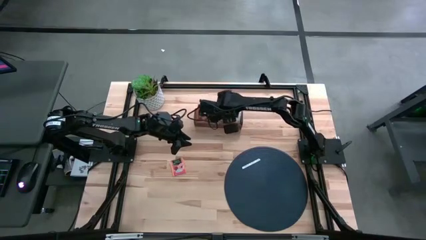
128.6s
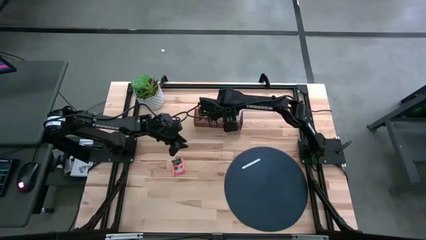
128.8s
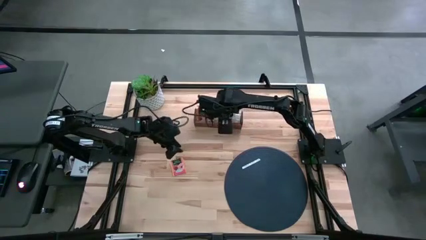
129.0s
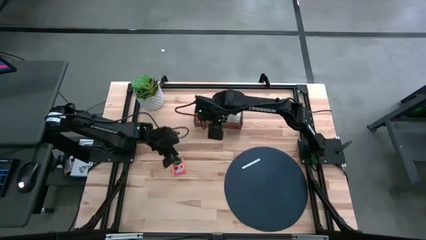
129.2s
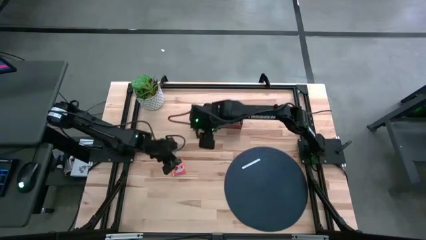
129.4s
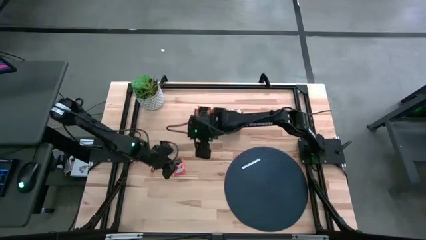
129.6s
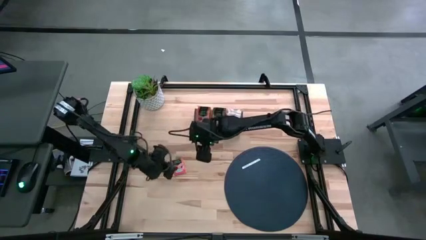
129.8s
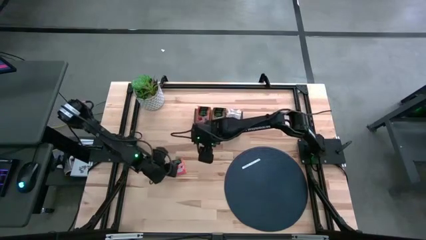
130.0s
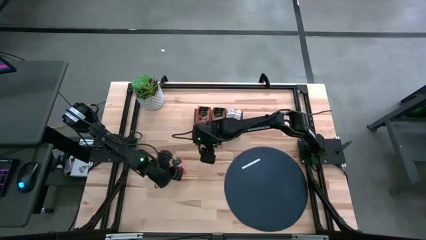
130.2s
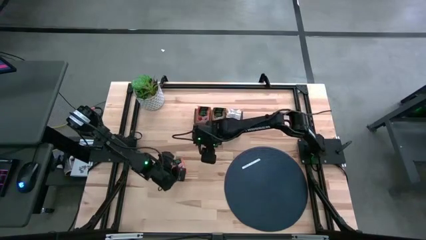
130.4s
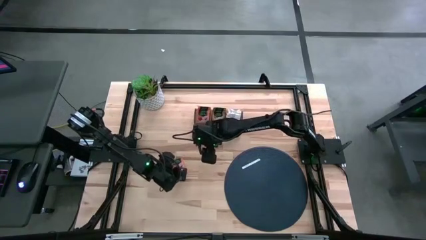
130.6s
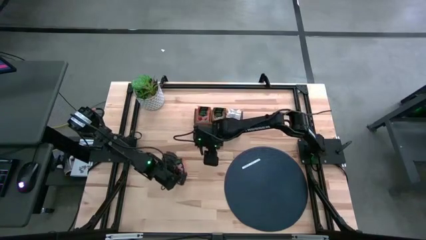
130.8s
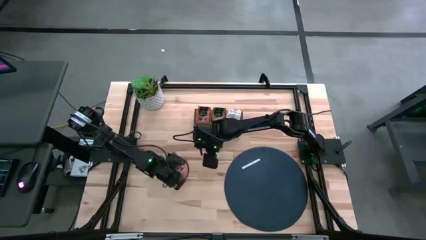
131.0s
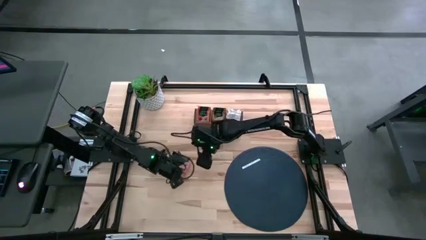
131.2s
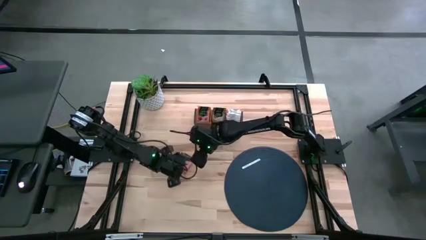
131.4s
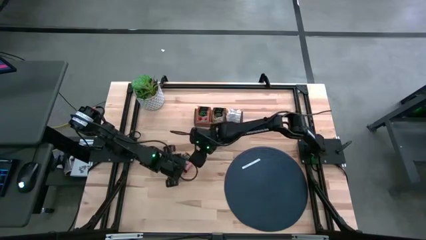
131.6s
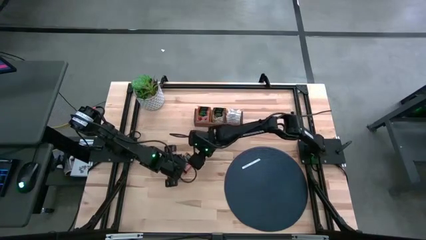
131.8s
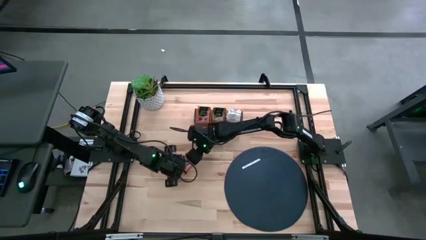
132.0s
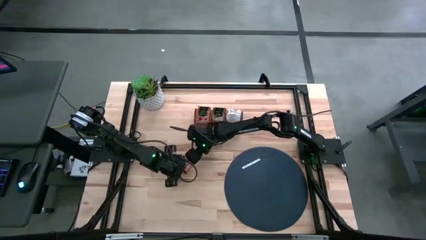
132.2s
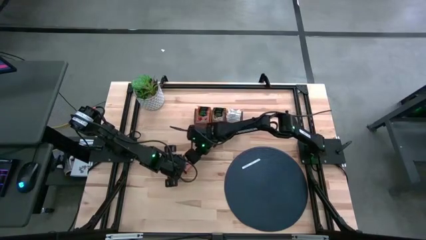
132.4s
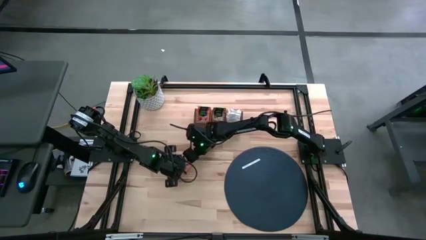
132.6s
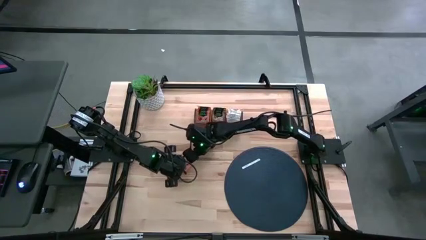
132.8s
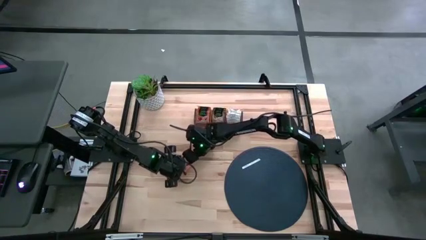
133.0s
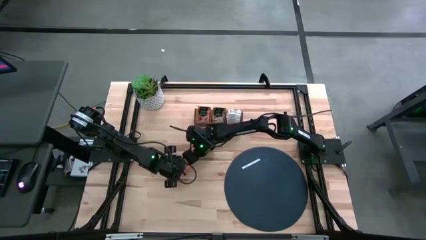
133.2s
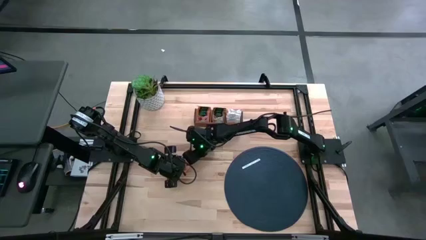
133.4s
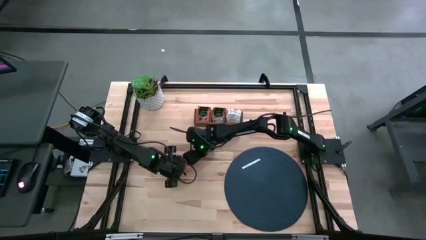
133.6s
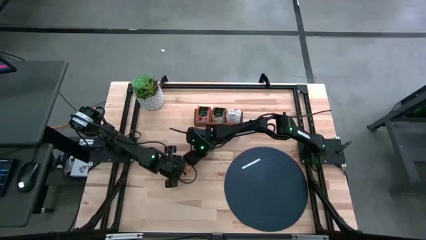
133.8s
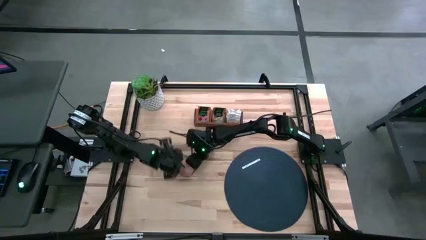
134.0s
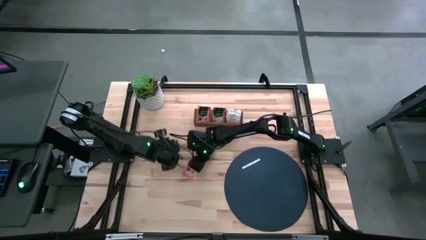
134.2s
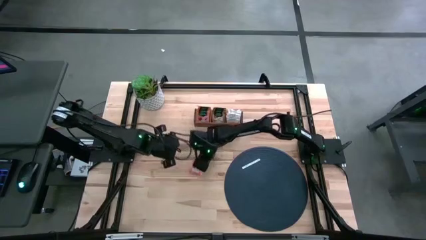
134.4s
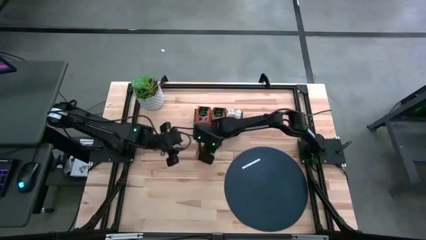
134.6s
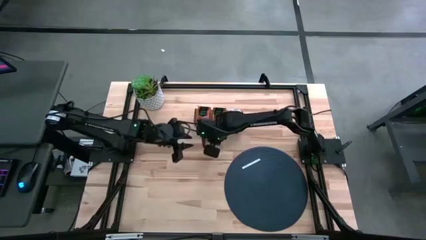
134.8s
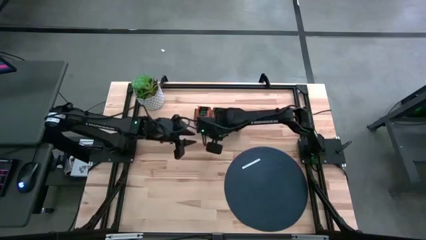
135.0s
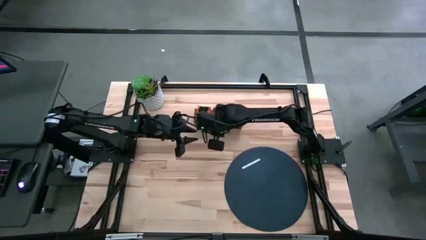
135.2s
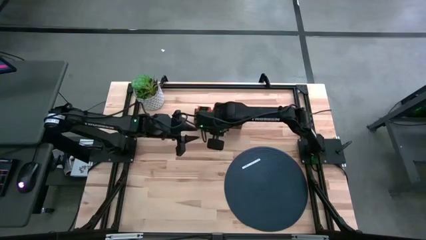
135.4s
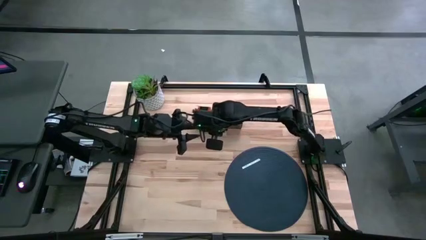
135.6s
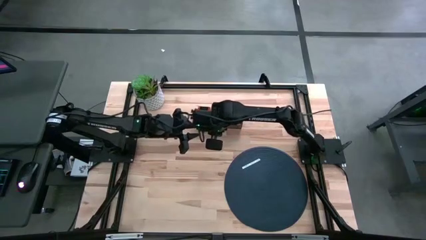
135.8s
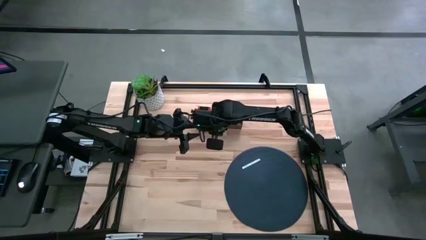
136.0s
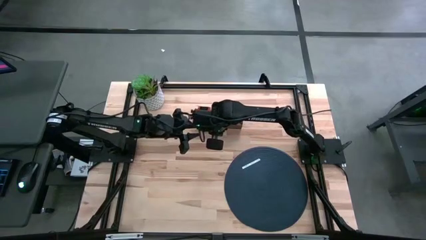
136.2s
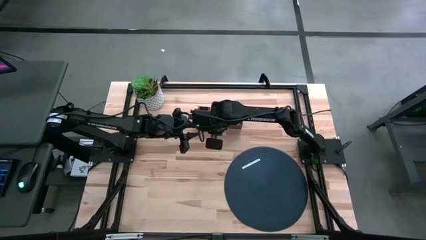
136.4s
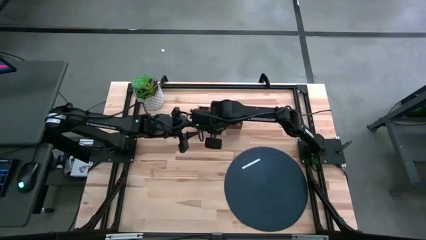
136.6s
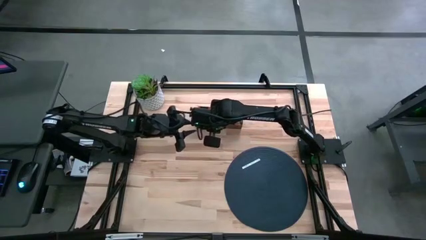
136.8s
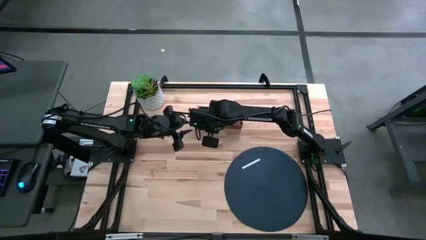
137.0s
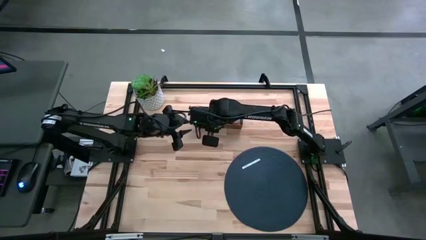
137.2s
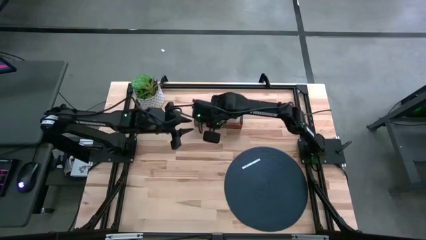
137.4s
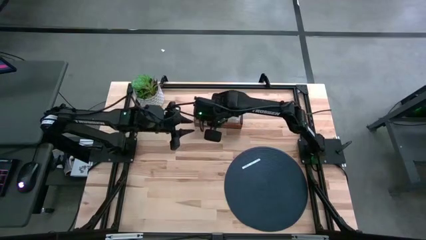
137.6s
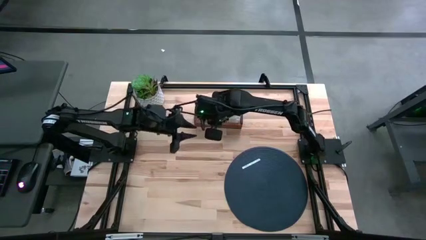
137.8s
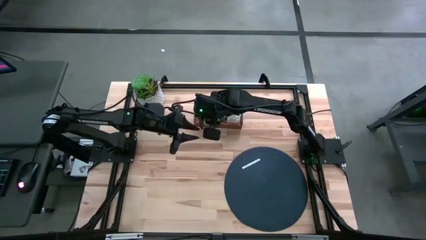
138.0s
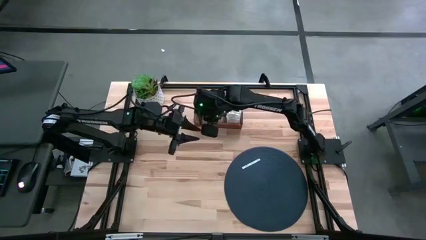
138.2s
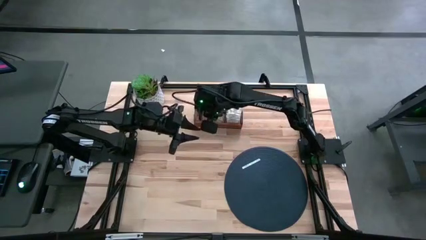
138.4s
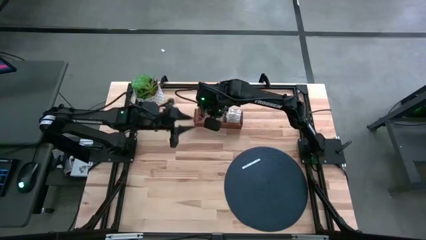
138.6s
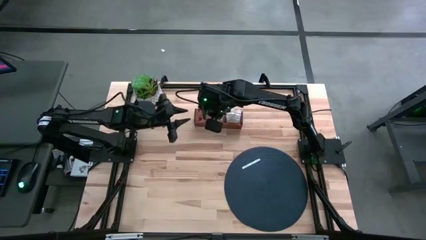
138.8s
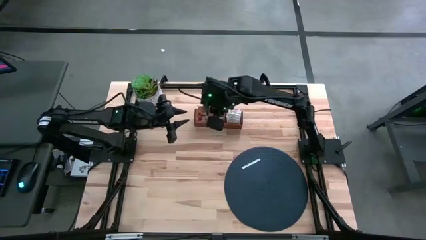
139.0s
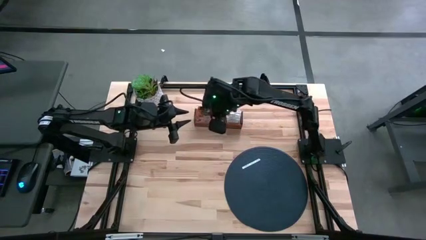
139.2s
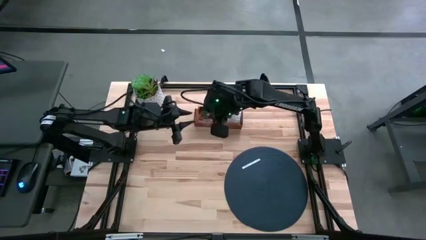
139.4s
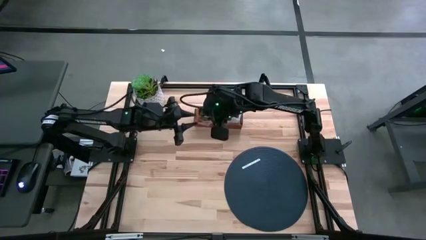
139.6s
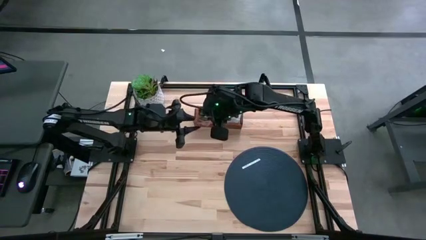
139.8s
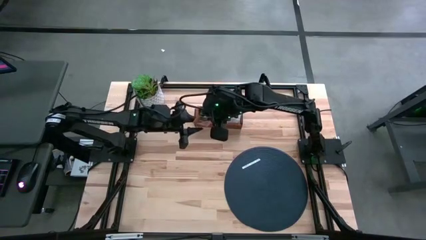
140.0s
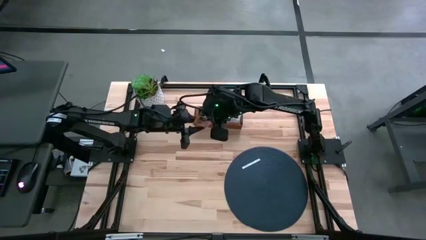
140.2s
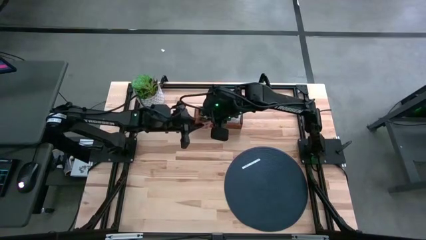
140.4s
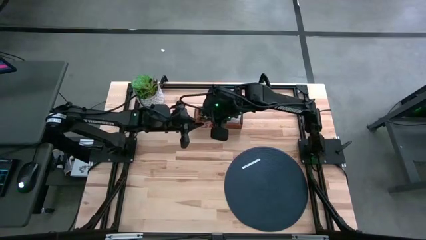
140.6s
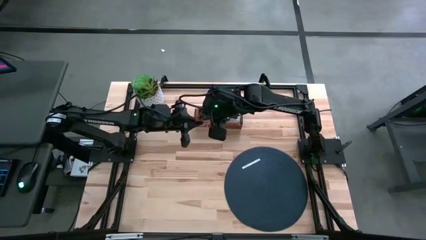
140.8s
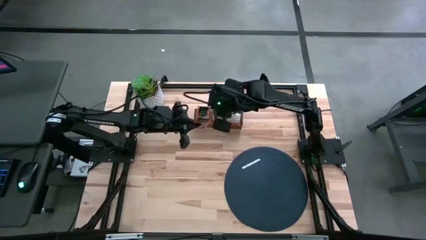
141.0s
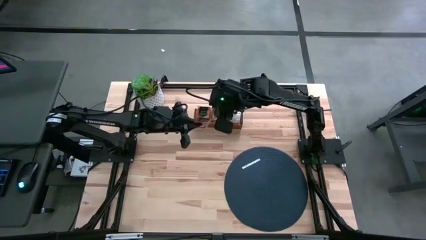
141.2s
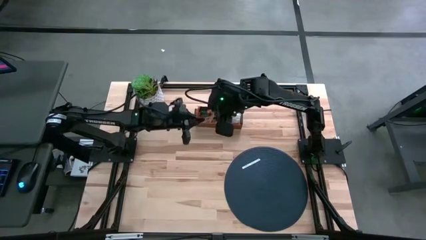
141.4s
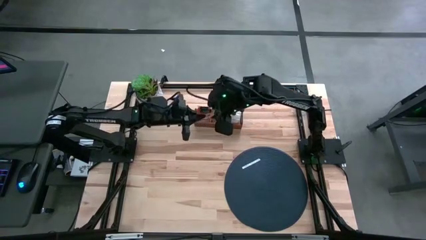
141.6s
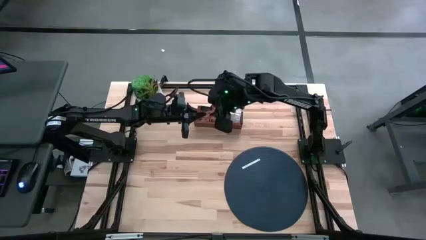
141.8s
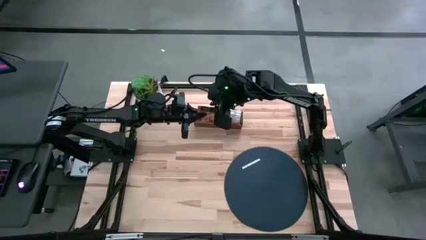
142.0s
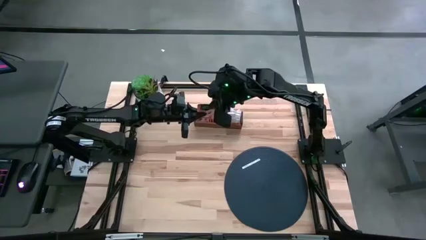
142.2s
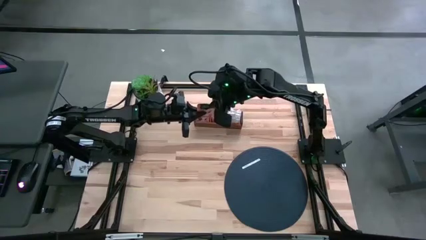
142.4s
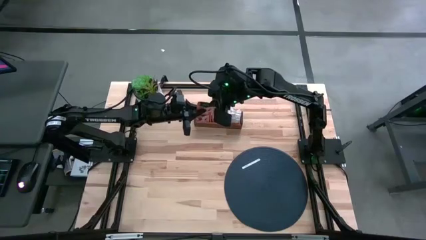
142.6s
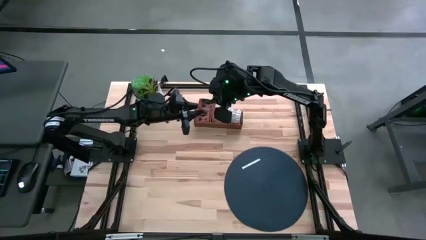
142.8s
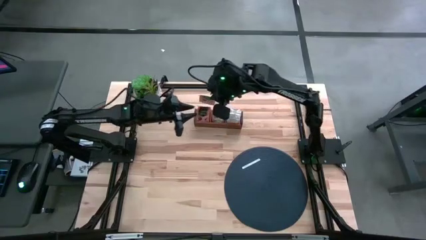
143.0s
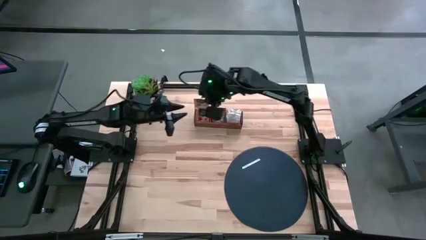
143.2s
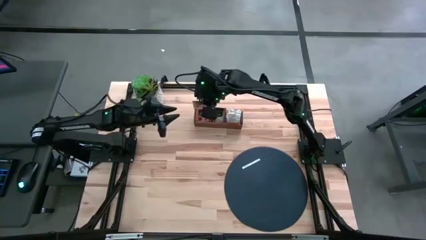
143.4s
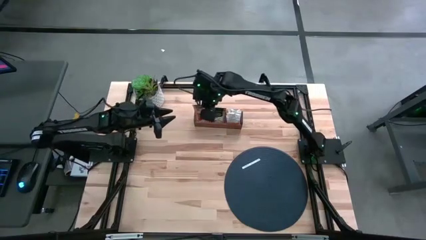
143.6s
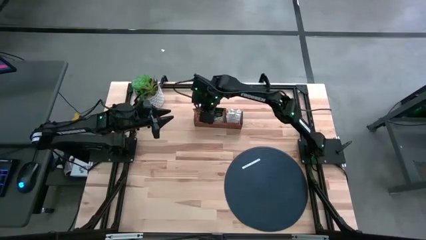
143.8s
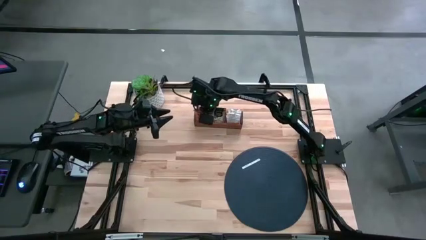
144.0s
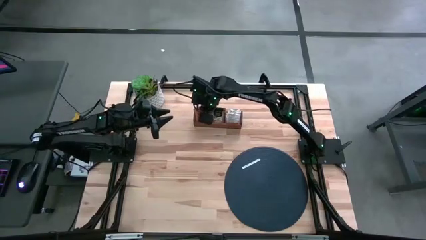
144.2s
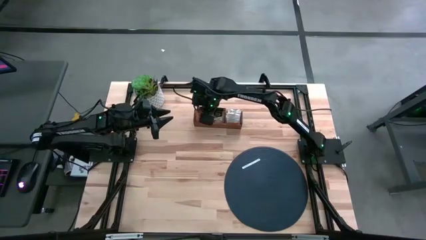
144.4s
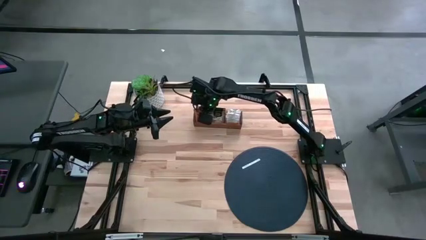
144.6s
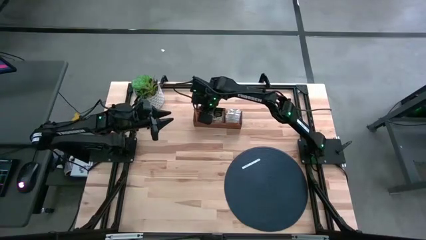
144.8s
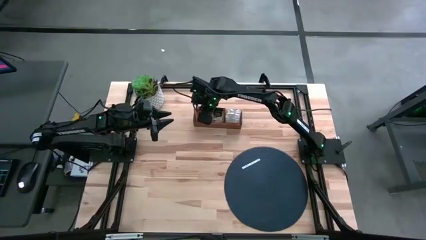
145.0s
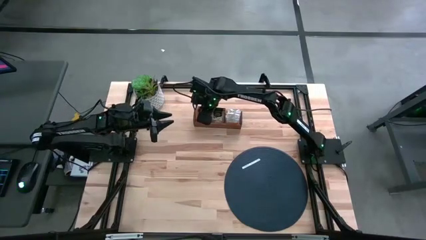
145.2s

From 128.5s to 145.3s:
Task: Pick & Place Tea
Put the red orange tea sachet into the left section of the wooden organizer
